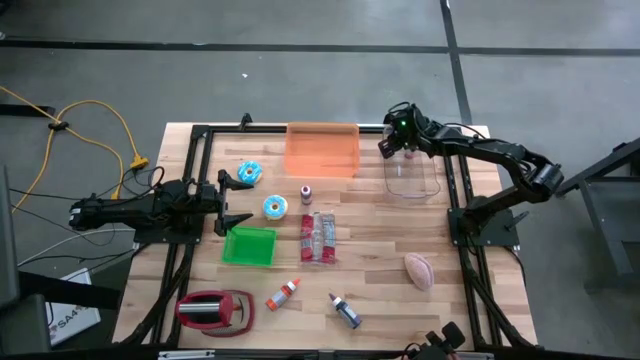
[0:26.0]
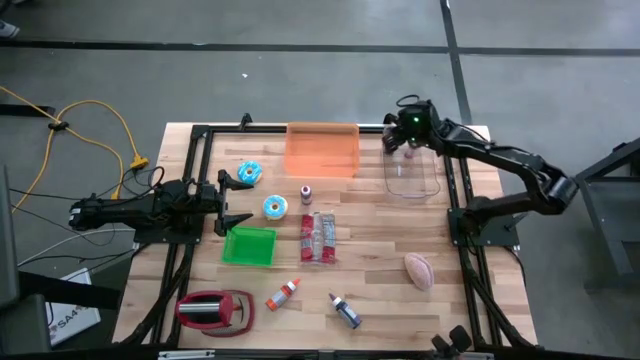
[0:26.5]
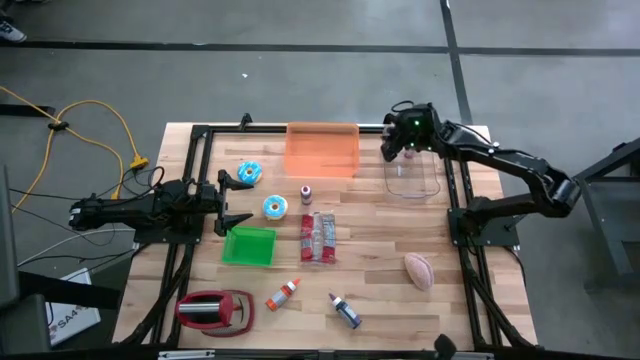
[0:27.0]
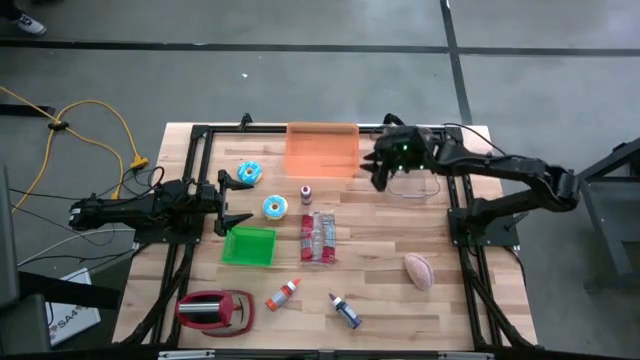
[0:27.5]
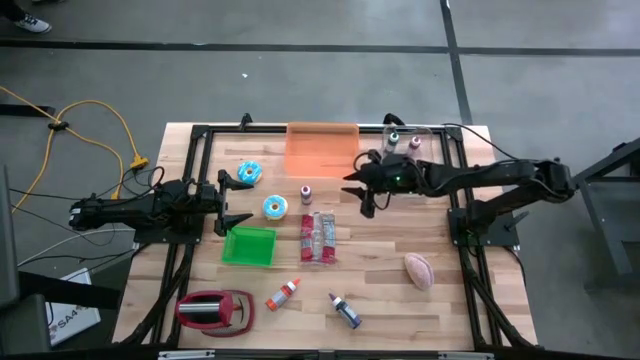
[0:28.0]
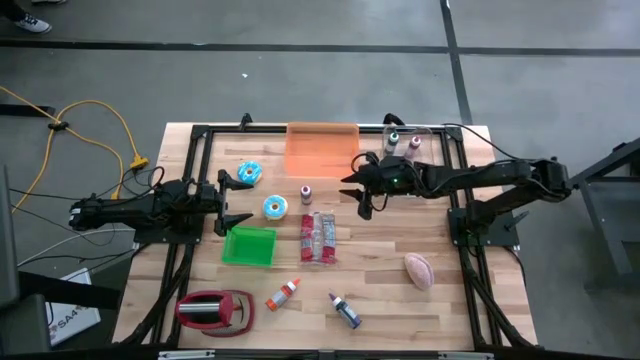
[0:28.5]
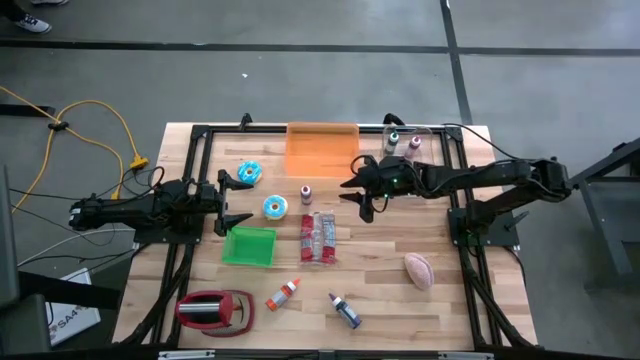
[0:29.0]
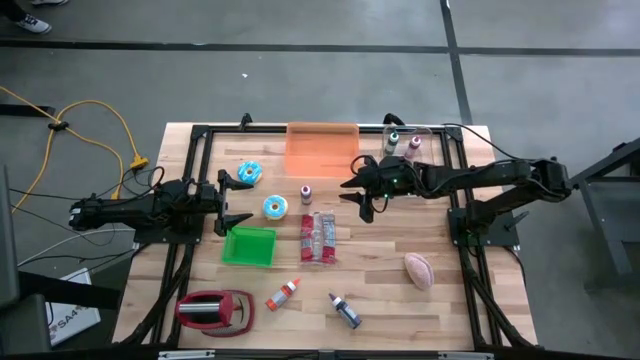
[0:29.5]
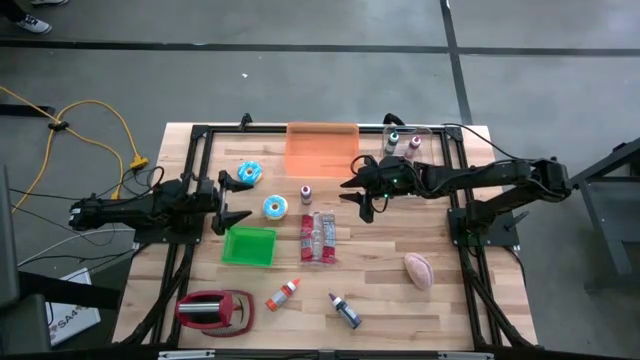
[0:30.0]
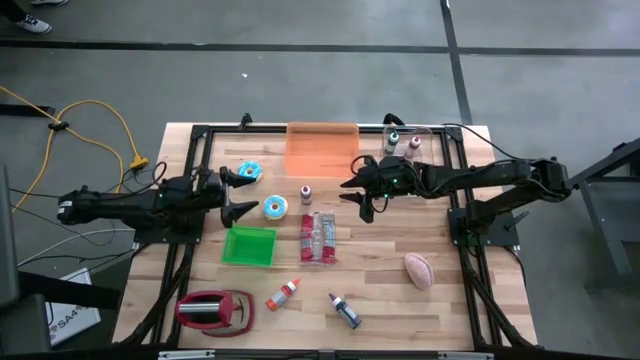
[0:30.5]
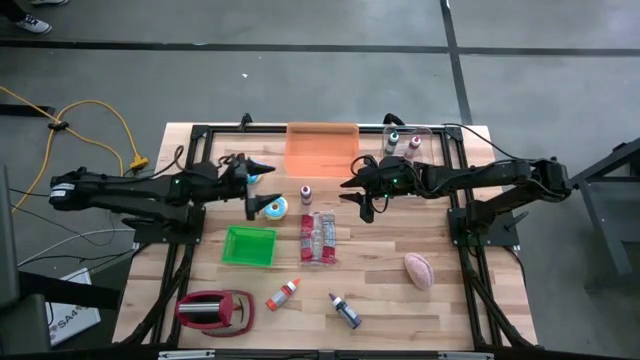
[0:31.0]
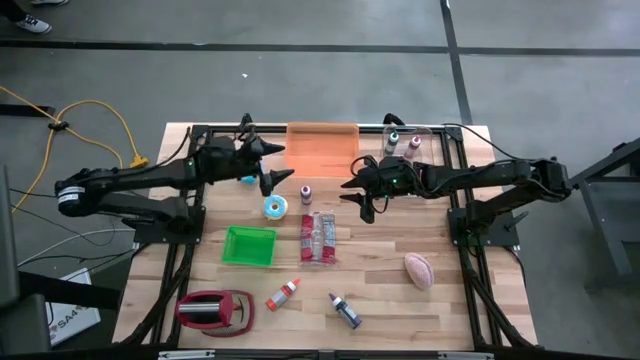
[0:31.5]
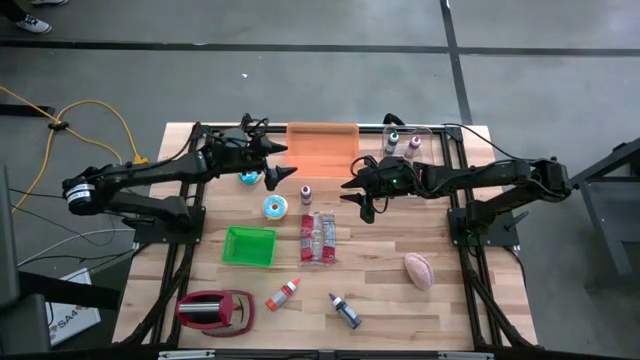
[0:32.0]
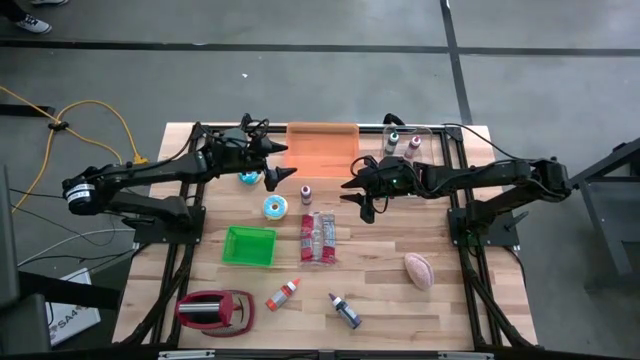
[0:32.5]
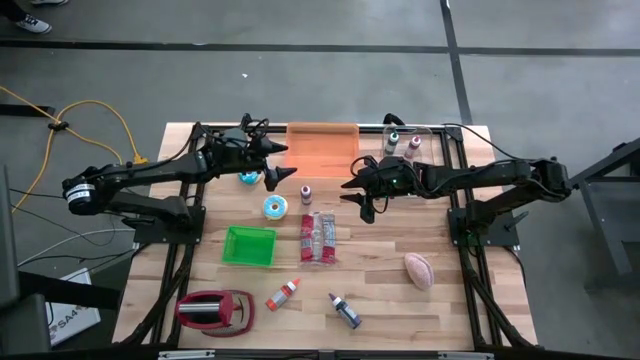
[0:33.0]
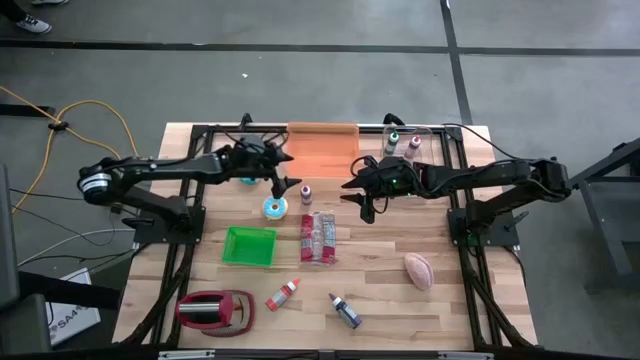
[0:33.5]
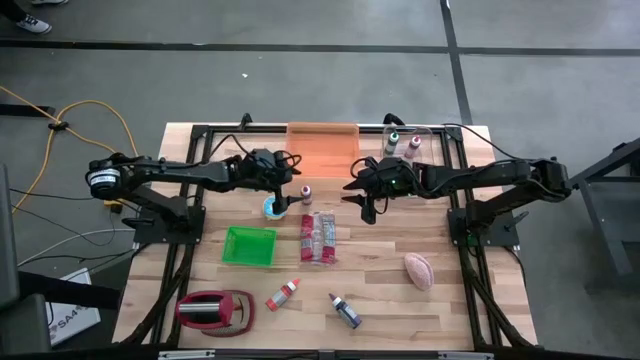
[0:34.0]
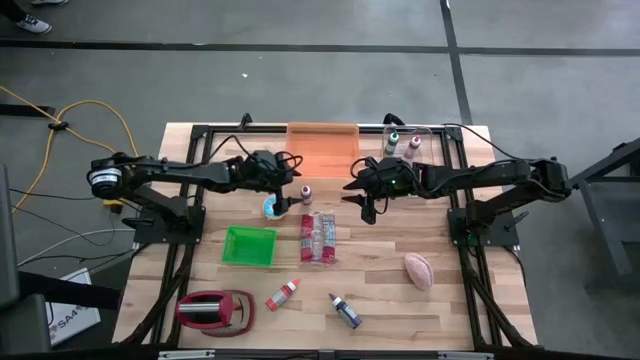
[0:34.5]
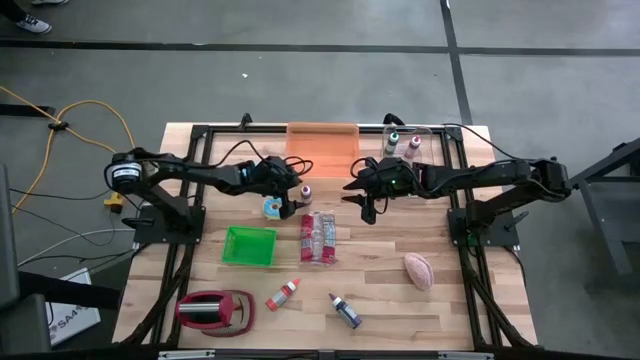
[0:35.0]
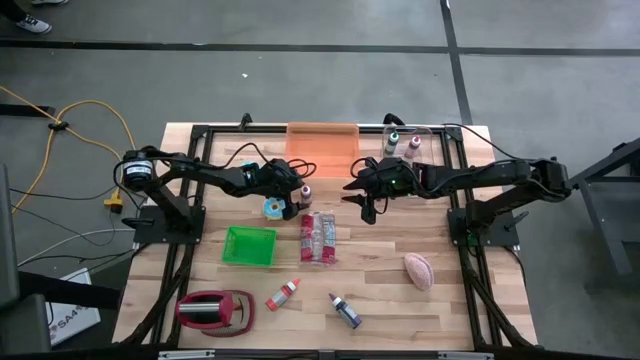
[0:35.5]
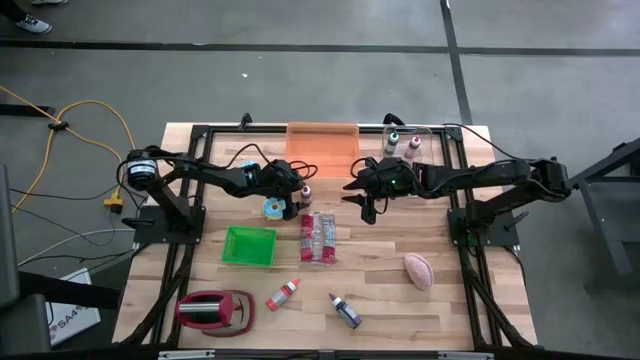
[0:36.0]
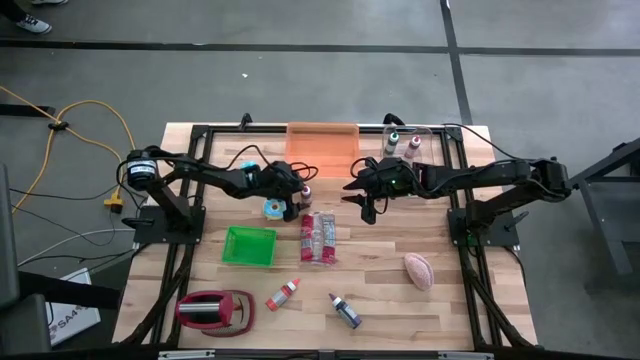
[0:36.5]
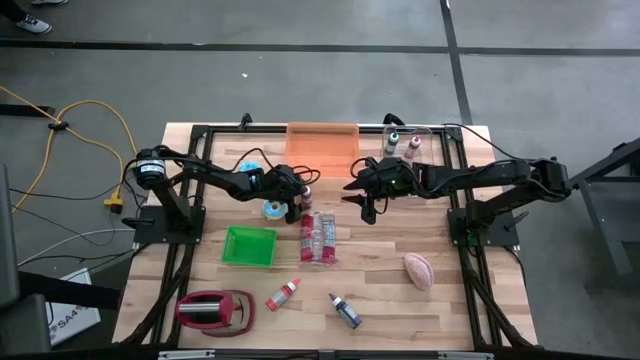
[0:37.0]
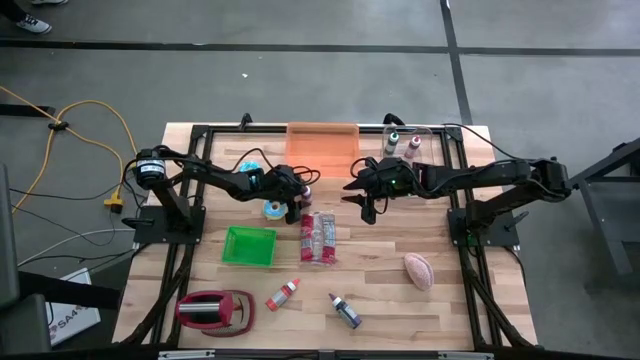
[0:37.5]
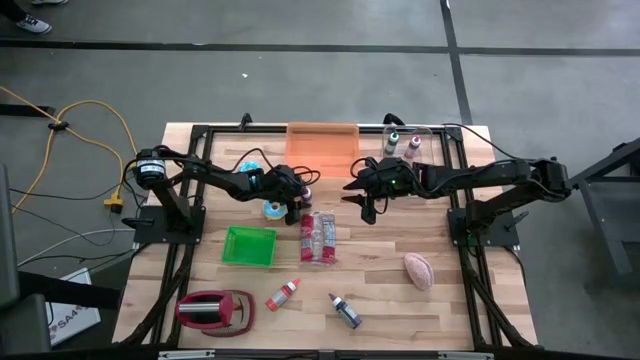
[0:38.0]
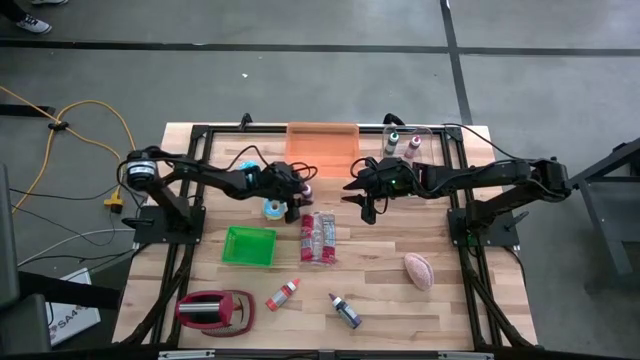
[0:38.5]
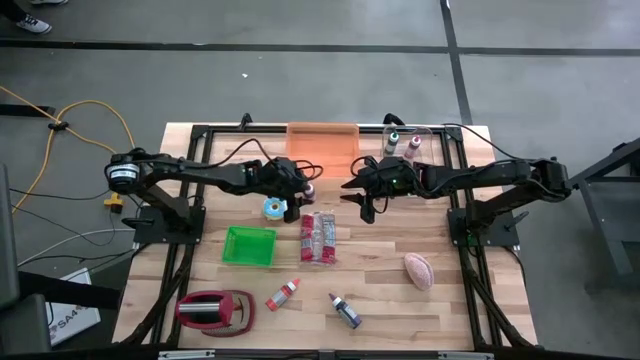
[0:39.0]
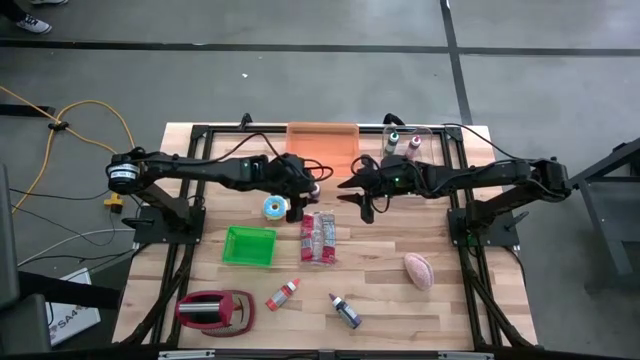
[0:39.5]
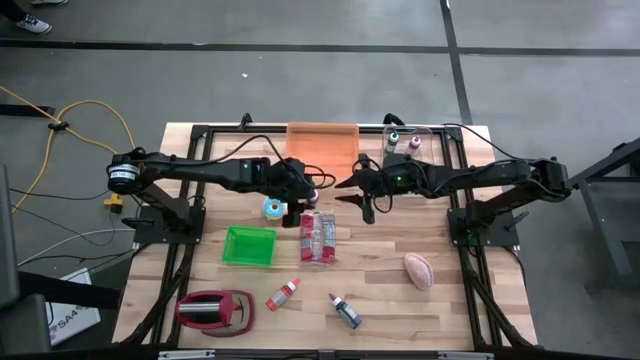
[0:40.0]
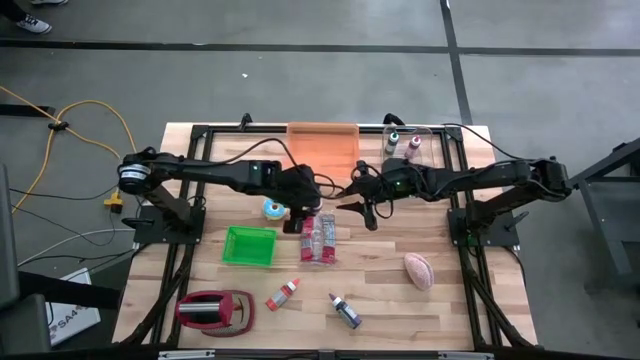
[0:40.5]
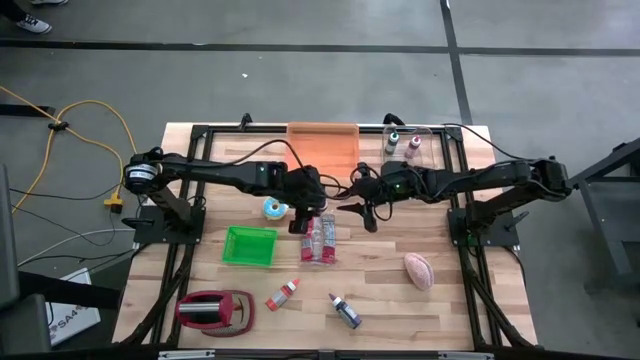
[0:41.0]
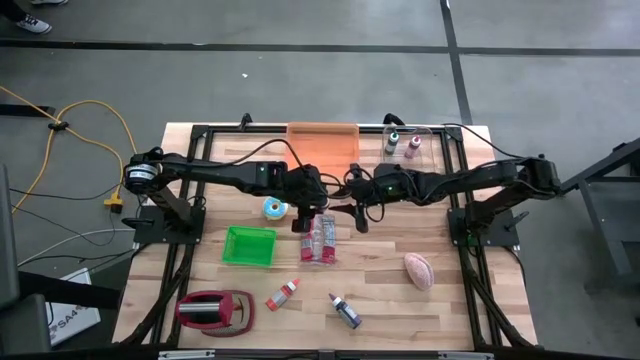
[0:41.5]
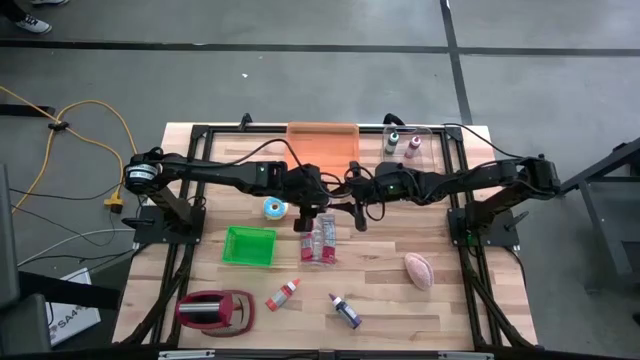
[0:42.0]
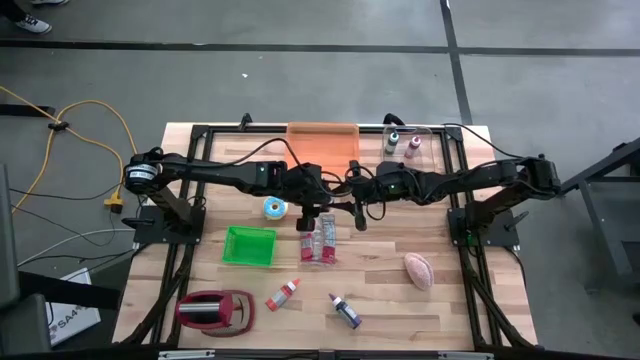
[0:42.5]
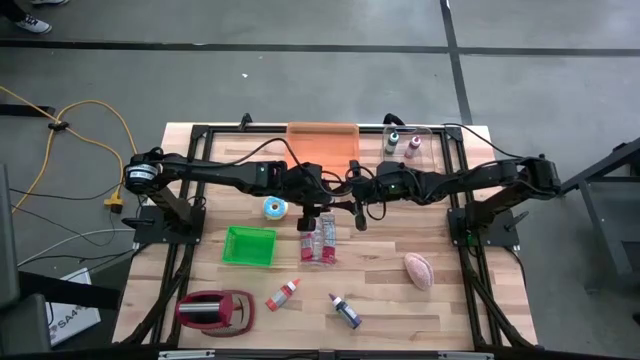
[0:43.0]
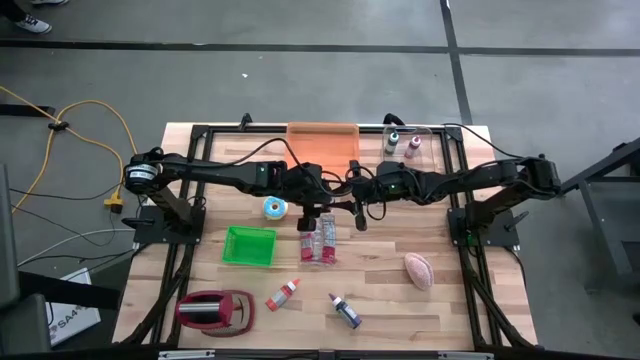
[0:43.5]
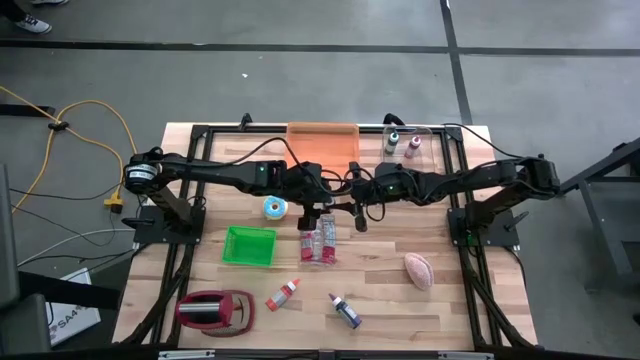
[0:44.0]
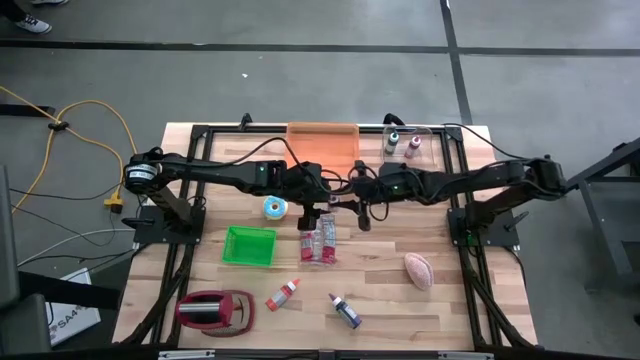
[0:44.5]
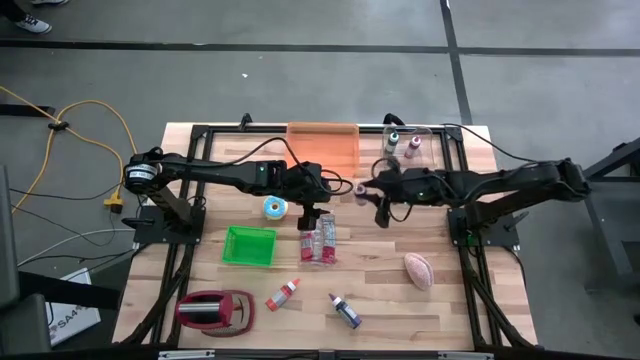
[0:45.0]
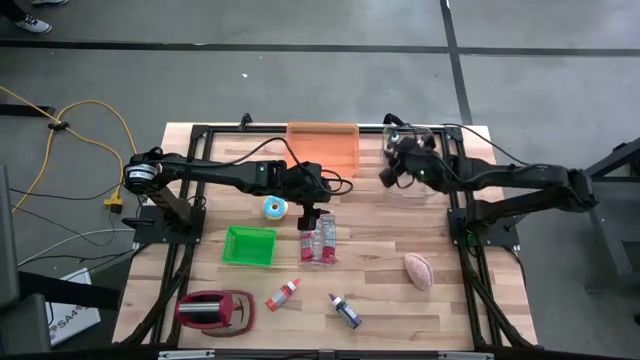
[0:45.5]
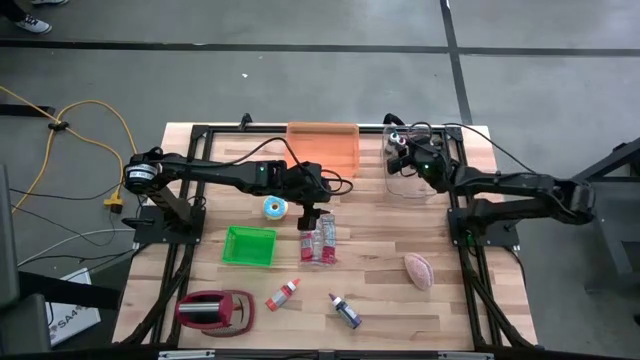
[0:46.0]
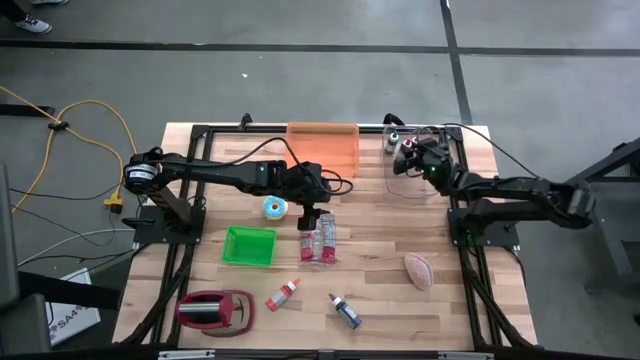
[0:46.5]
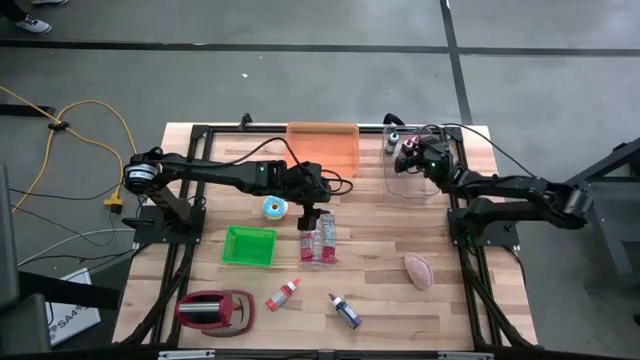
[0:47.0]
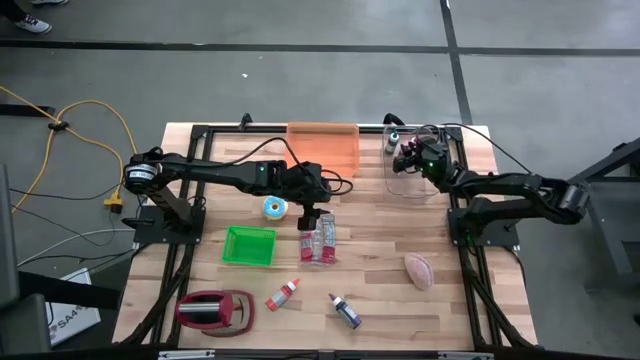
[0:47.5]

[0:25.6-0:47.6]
Put the red food coloring bottle into the transparent bin
